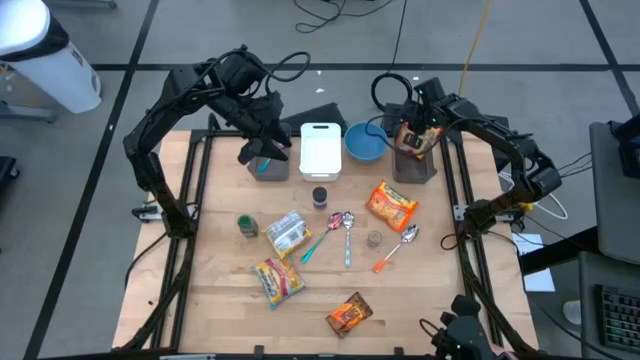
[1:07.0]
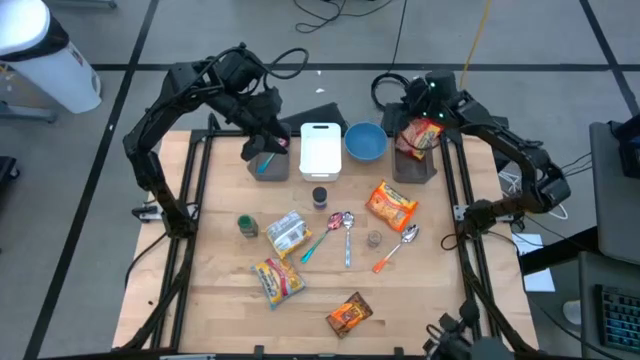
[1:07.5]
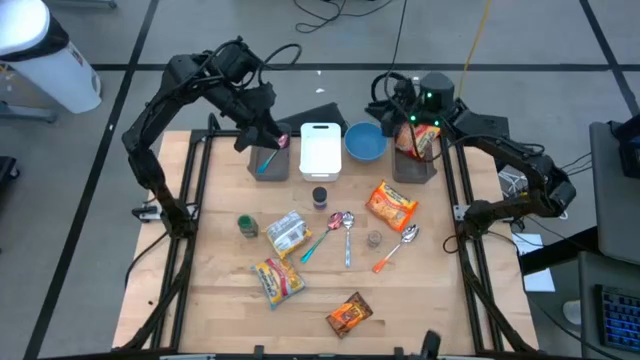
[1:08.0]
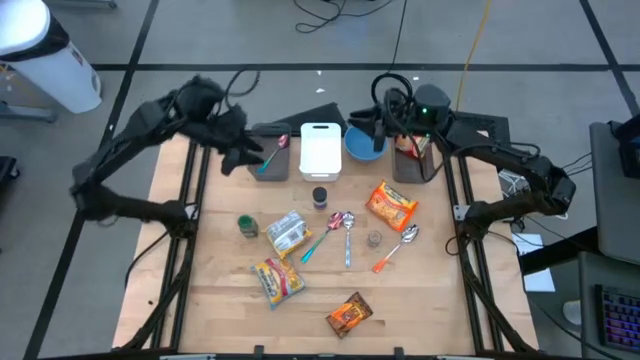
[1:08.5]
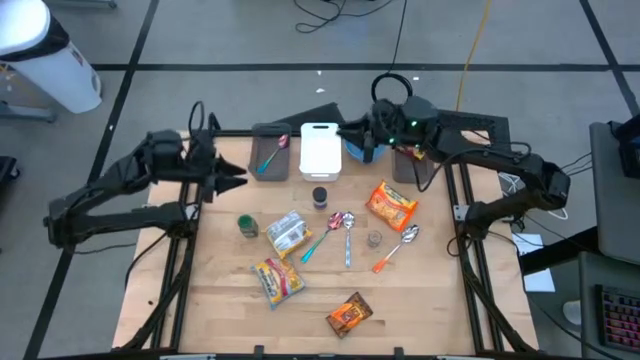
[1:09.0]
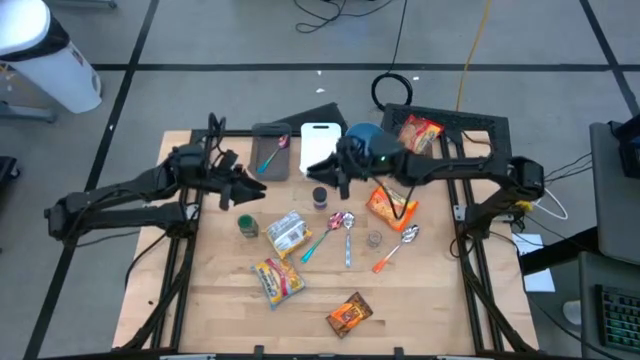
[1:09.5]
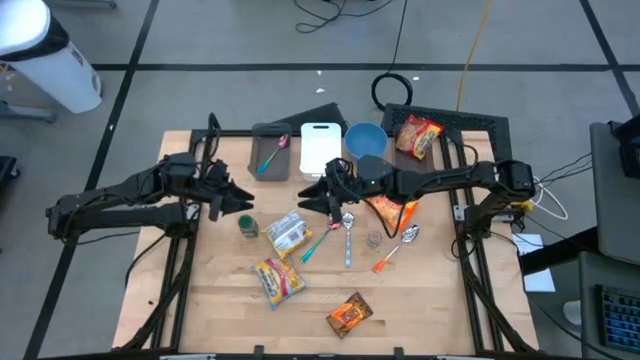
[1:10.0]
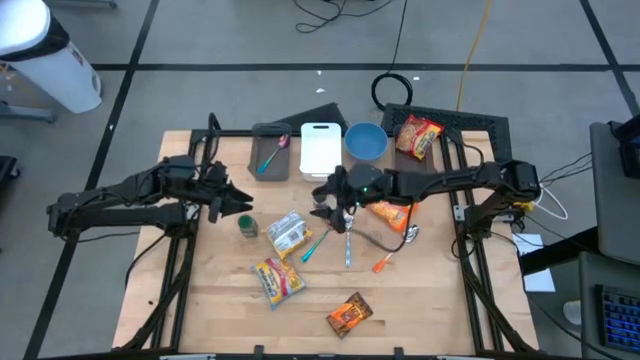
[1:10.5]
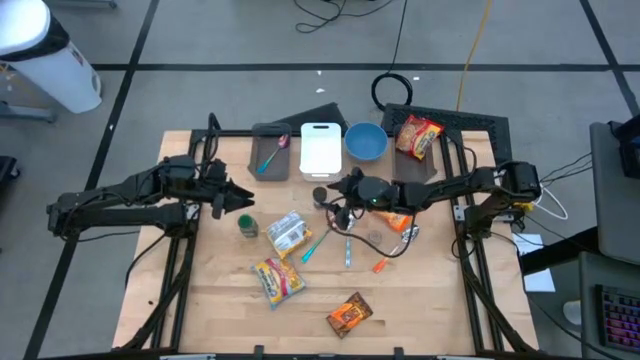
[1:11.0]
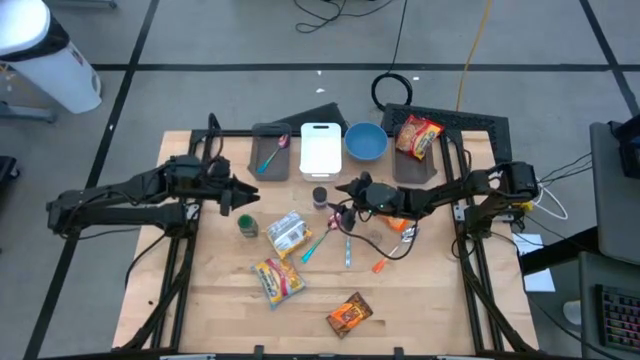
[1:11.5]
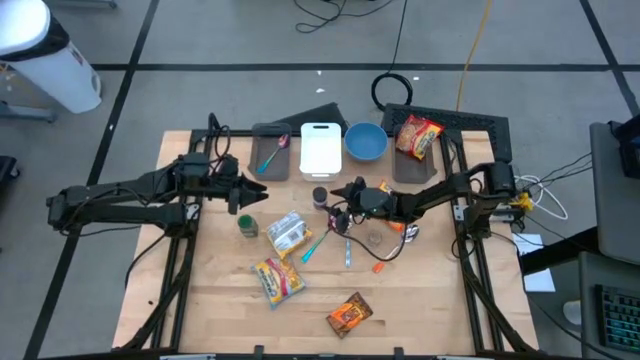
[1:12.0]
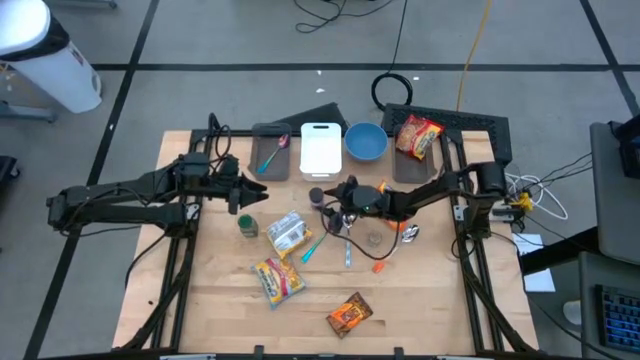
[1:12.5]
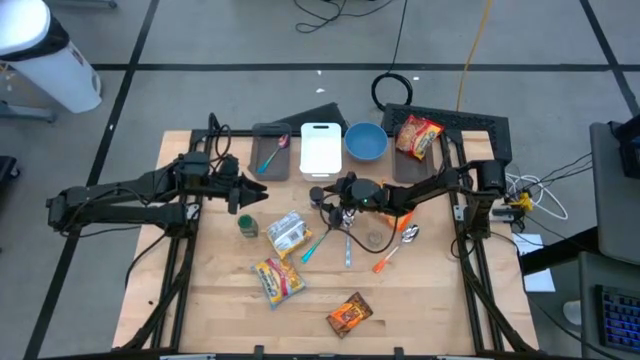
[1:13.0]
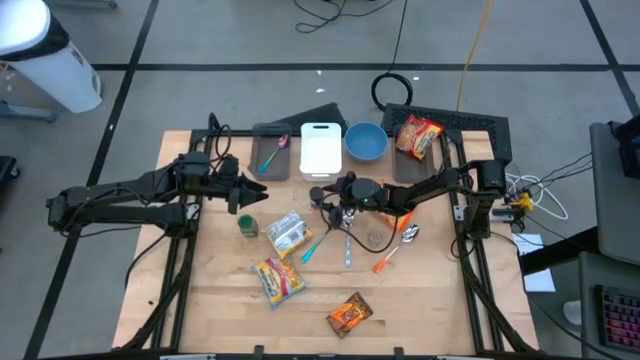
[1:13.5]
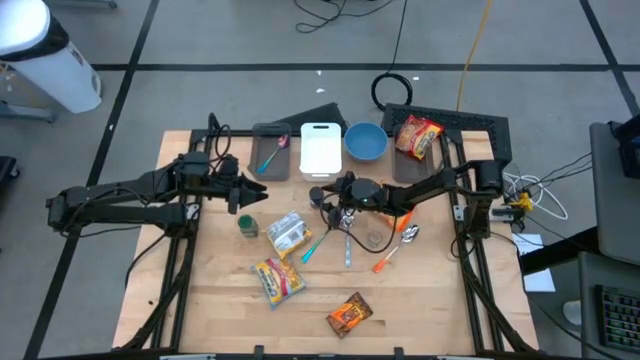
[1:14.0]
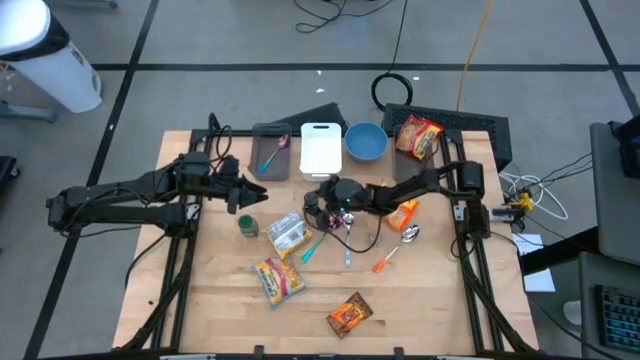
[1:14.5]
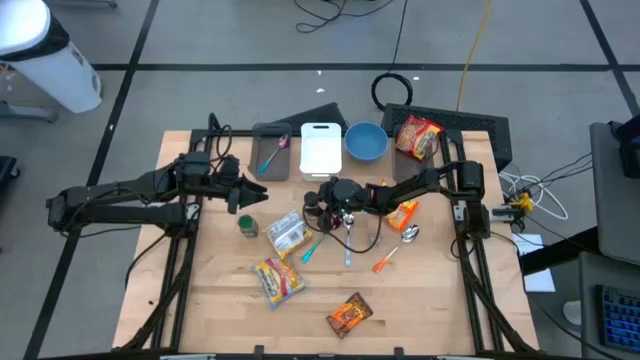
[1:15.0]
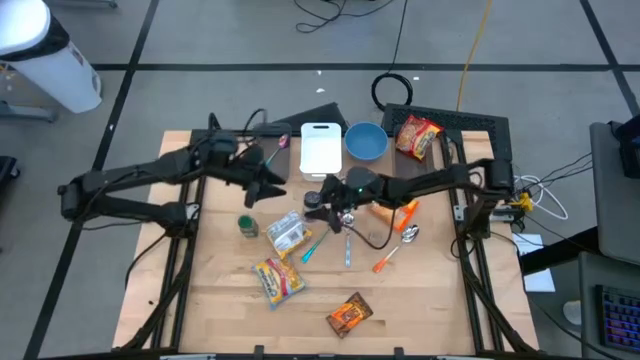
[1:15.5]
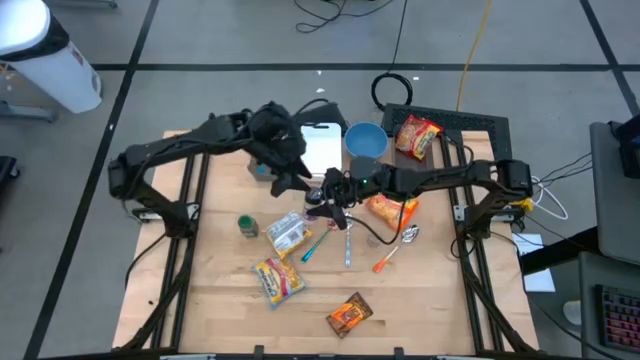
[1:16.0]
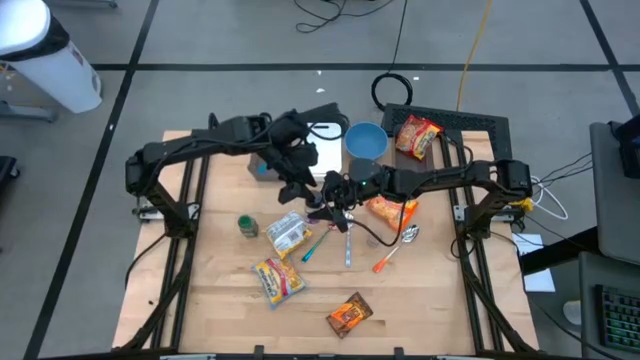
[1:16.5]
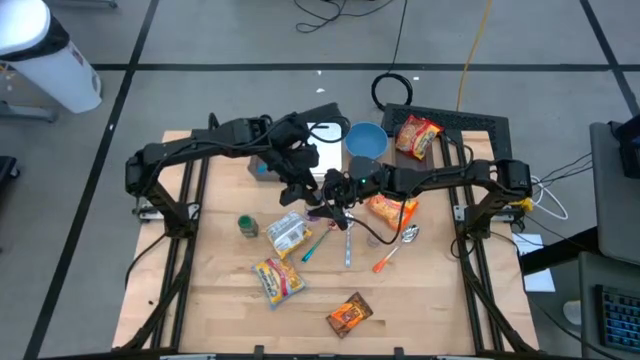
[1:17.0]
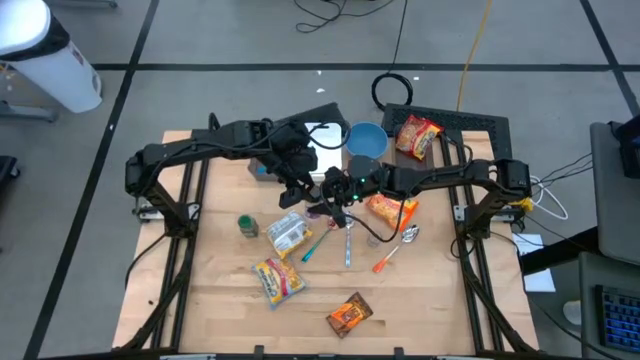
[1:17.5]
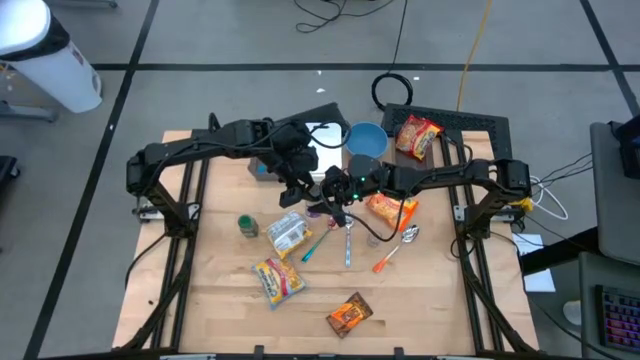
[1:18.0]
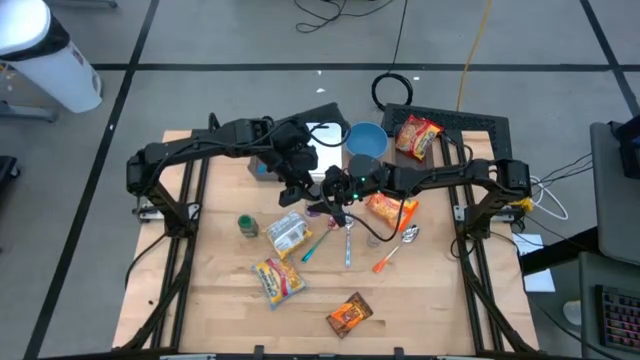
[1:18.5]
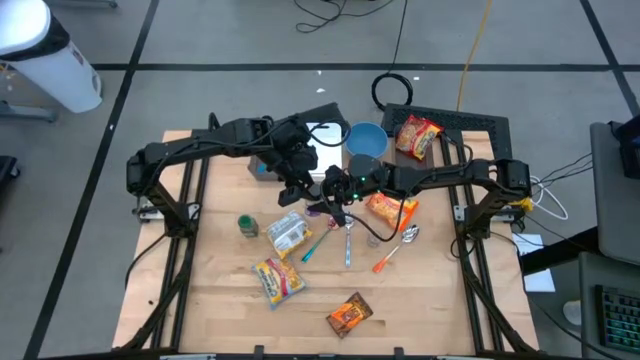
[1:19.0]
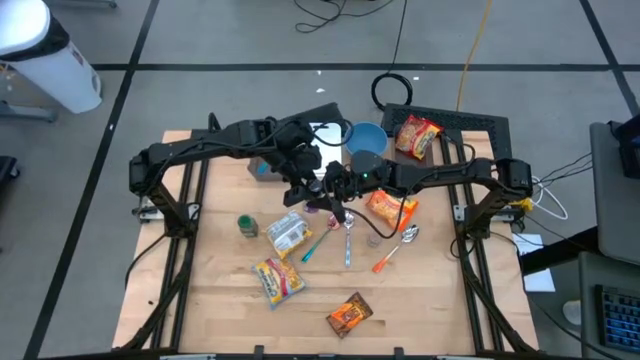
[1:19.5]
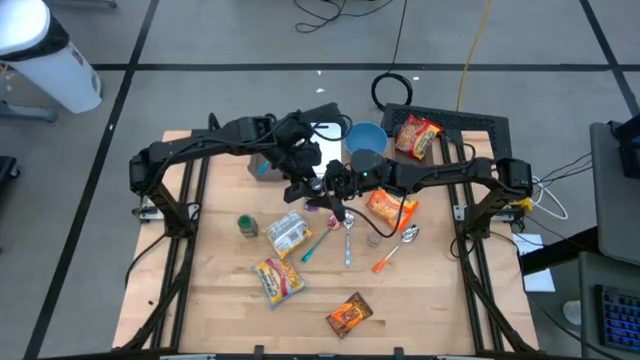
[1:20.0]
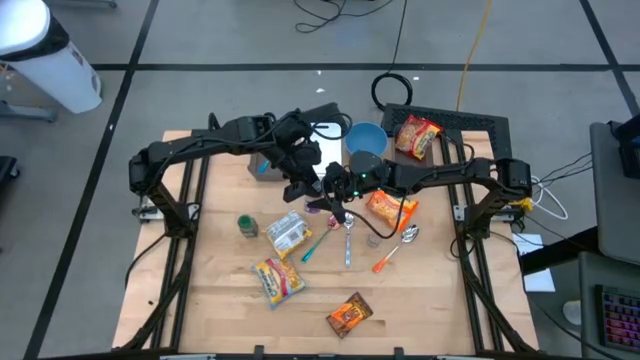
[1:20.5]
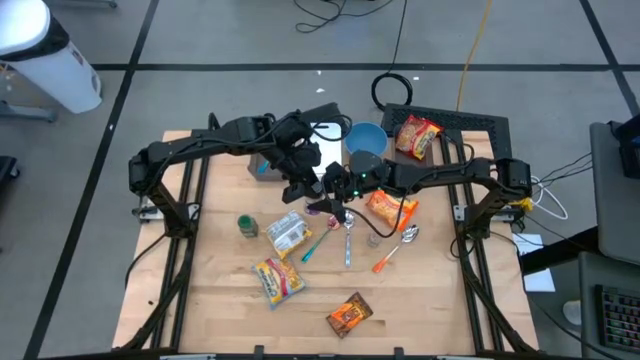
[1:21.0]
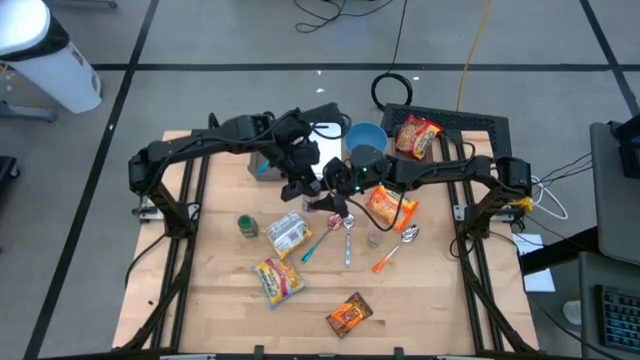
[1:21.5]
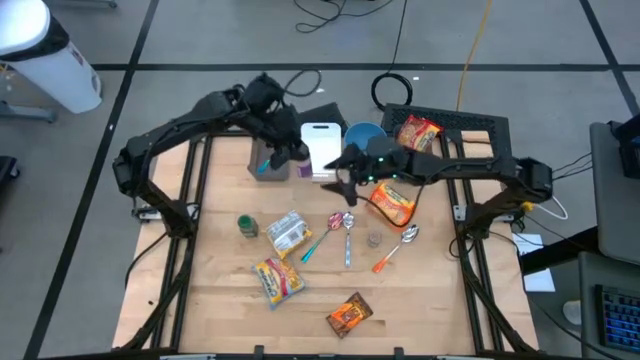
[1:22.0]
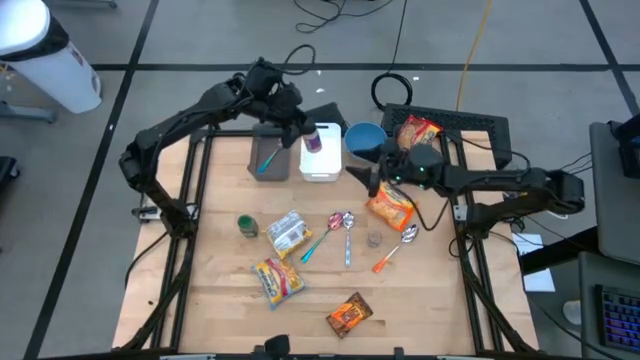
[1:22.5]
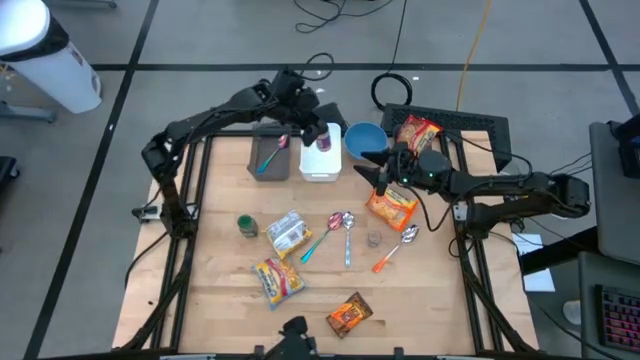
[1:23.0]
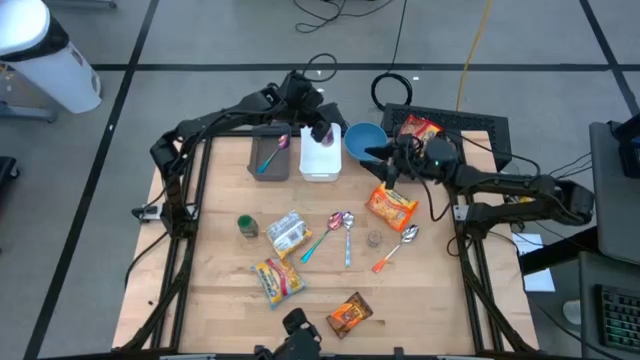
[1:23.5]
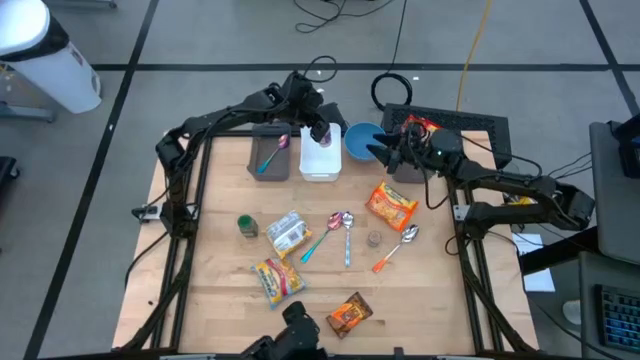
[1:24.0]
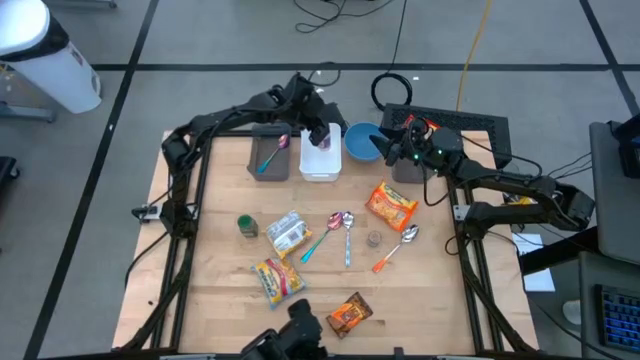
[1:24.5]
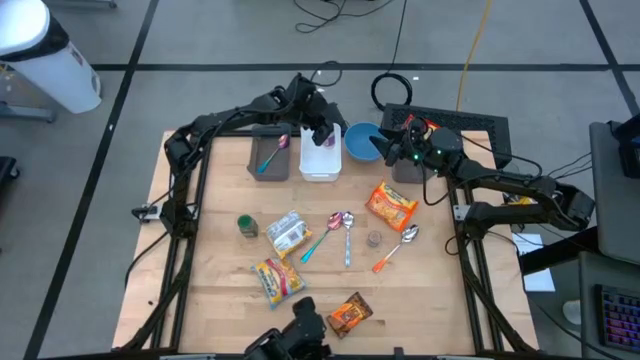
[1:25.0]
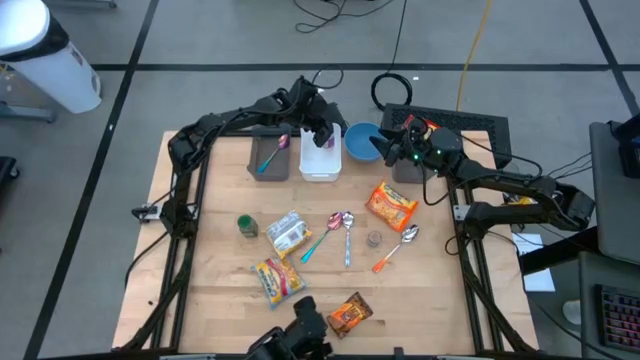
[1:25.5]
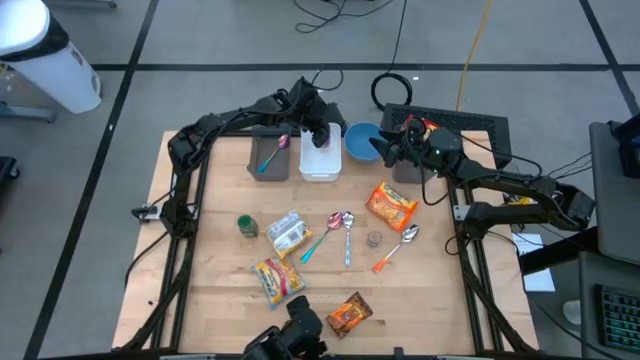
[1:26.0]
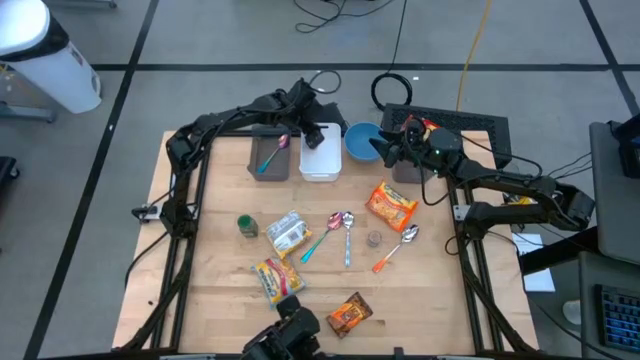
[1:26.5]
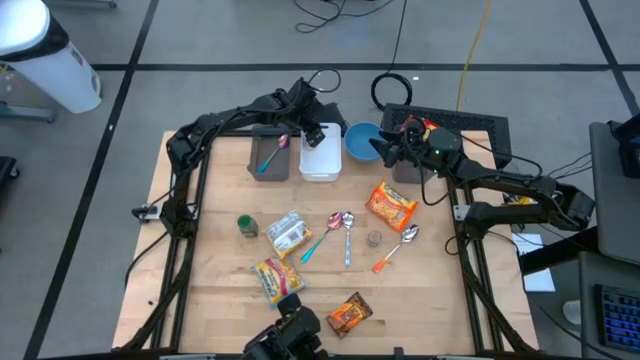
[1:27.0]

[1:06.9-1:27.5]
Task: Pick & Place Food Item
Put the black seasoning bottle into the white bin
